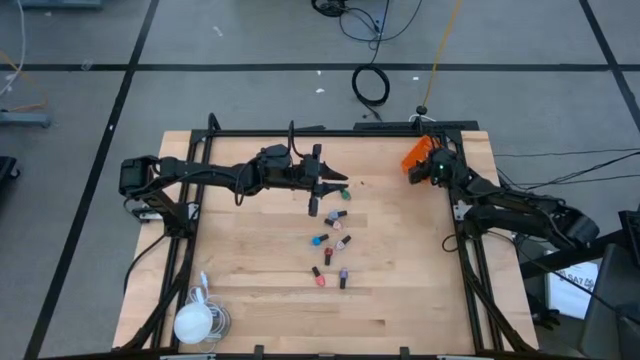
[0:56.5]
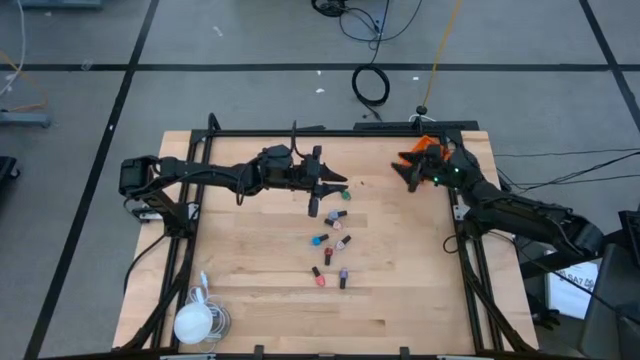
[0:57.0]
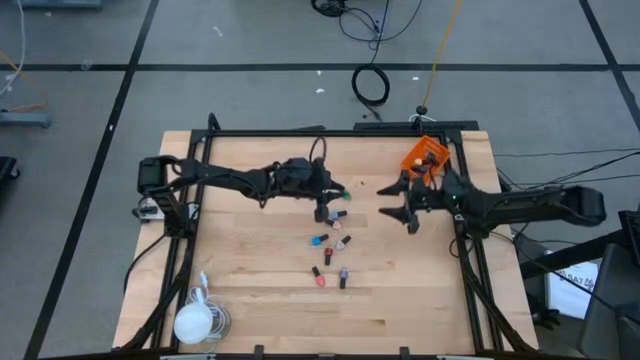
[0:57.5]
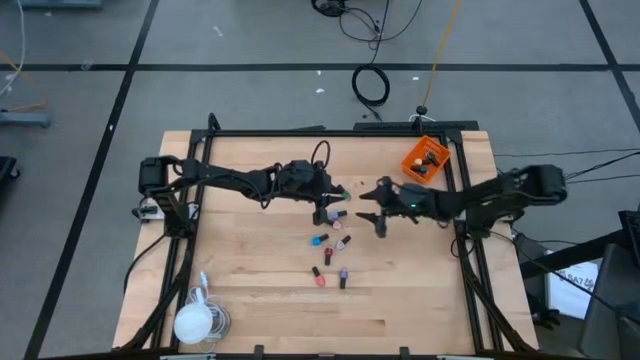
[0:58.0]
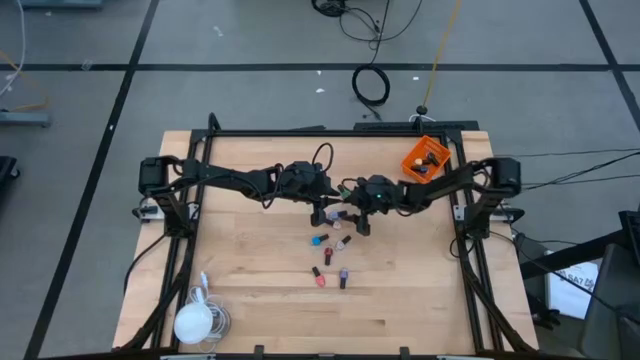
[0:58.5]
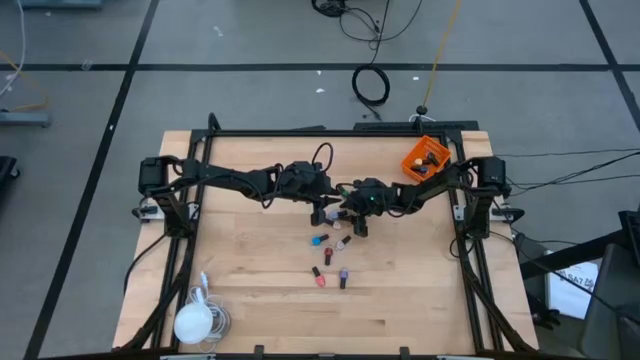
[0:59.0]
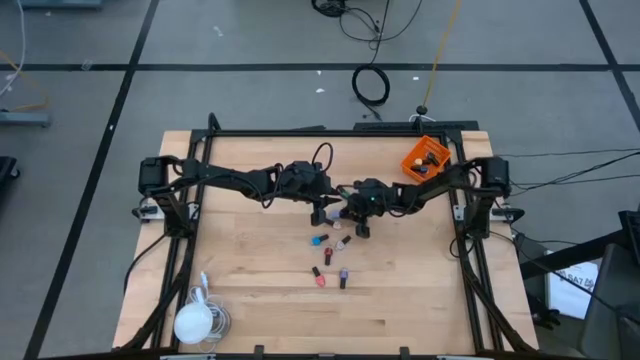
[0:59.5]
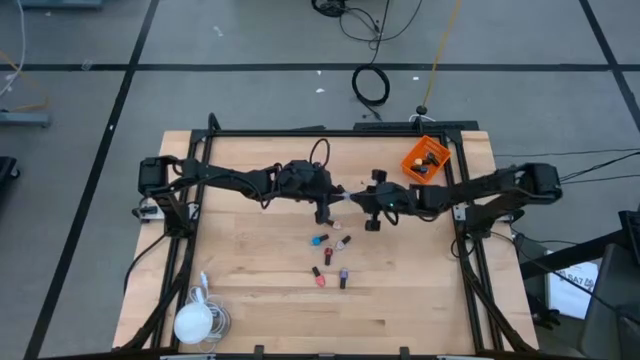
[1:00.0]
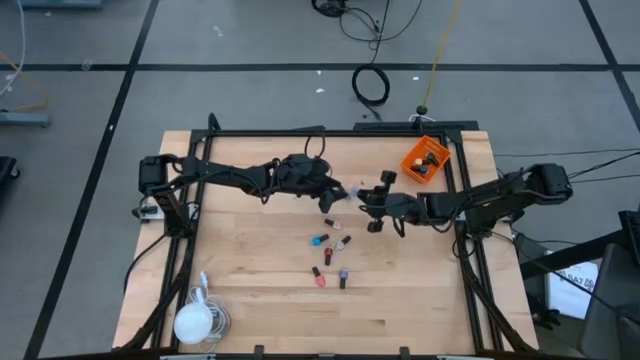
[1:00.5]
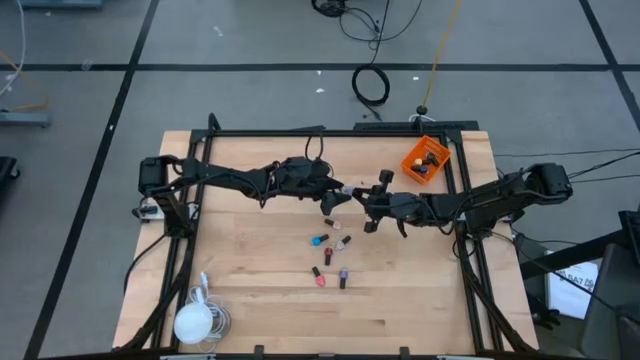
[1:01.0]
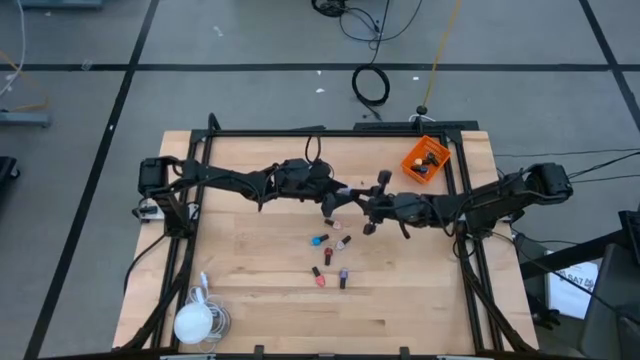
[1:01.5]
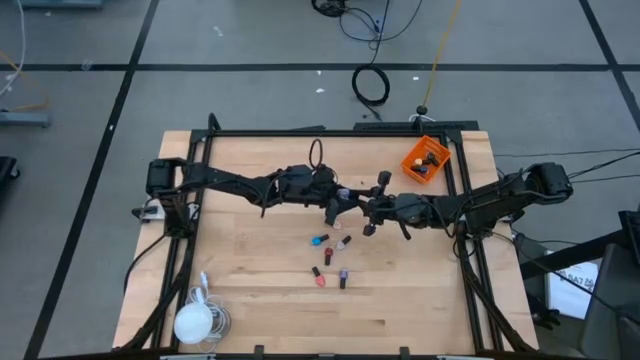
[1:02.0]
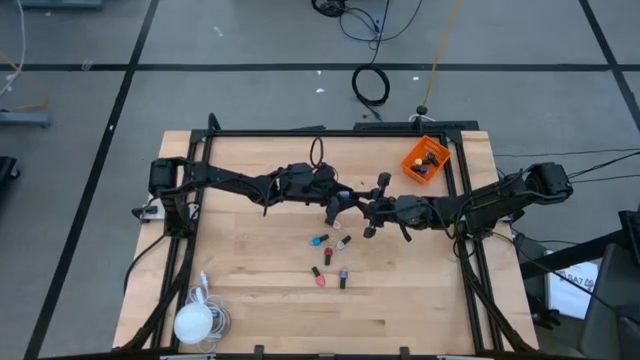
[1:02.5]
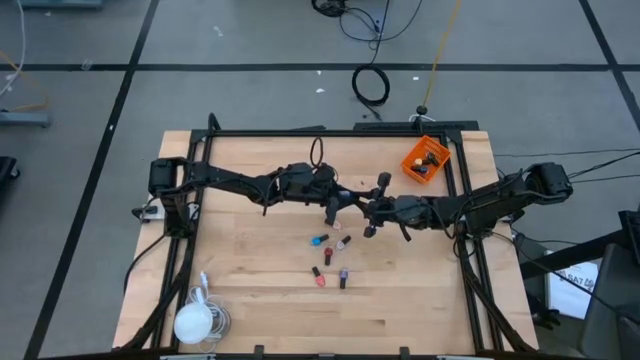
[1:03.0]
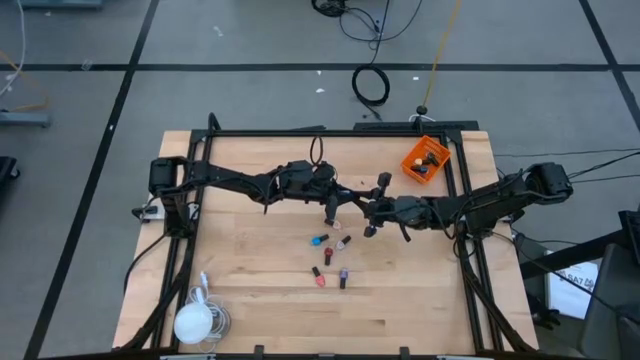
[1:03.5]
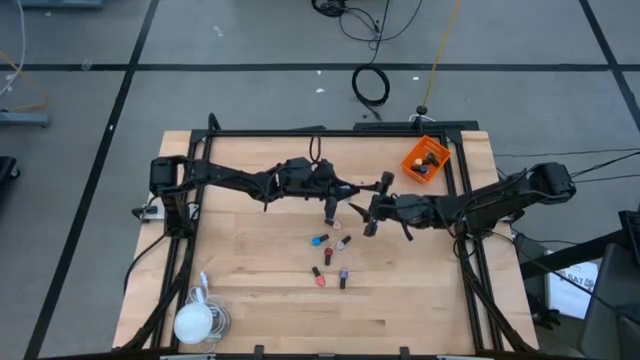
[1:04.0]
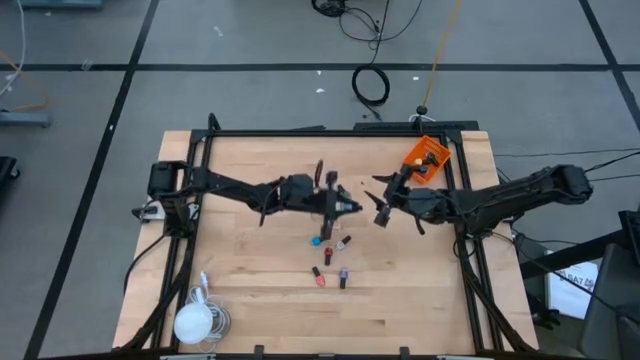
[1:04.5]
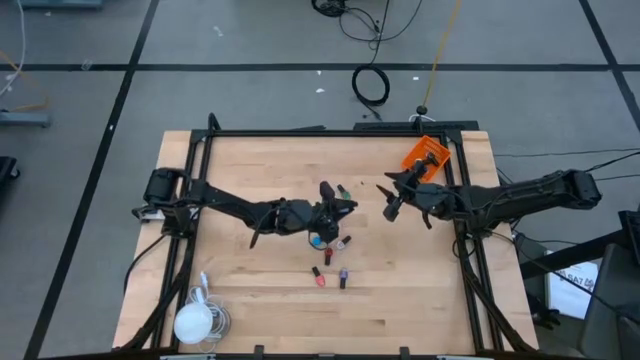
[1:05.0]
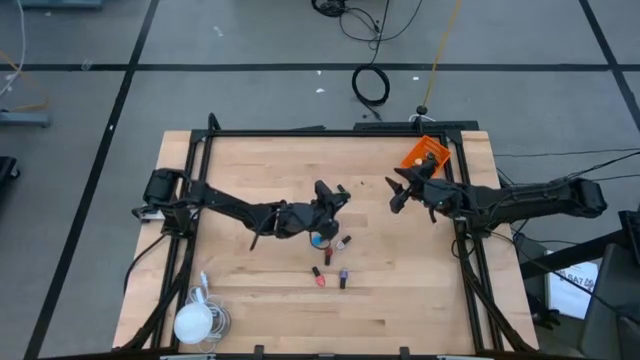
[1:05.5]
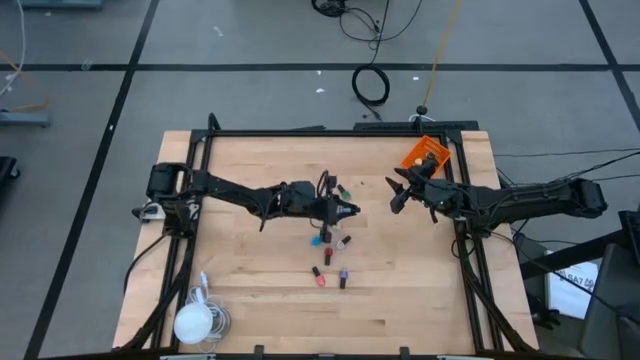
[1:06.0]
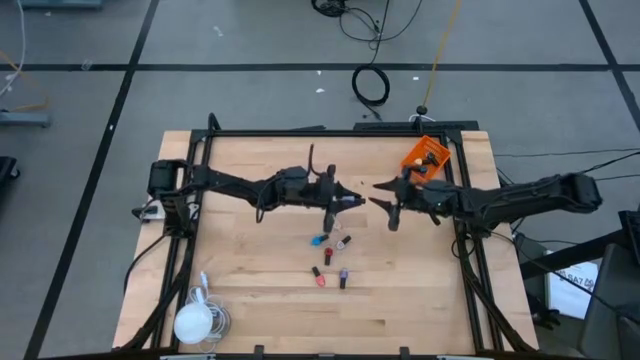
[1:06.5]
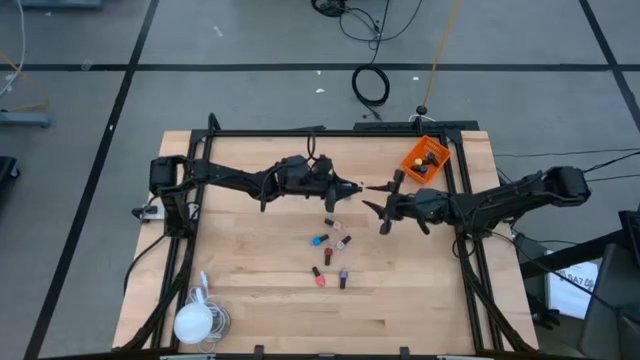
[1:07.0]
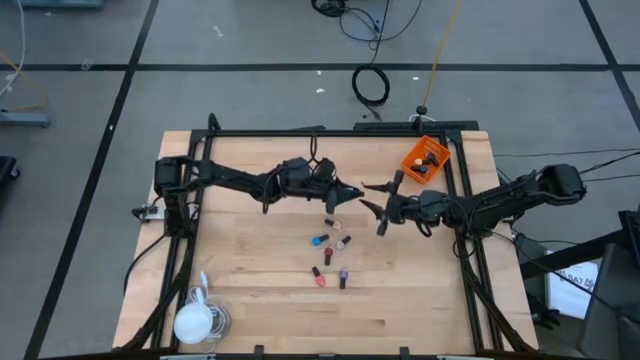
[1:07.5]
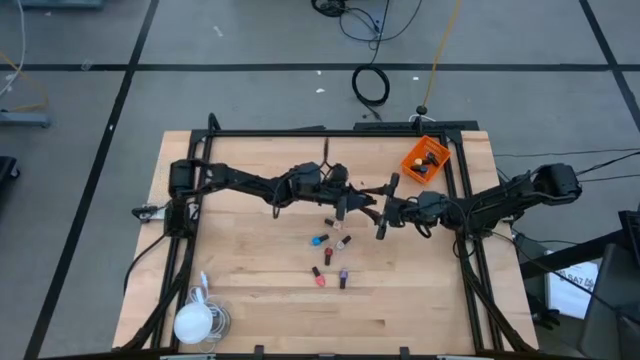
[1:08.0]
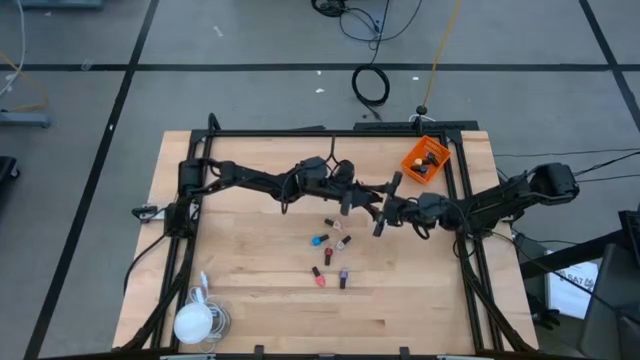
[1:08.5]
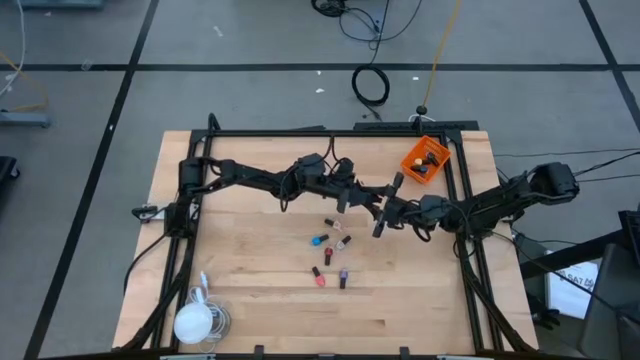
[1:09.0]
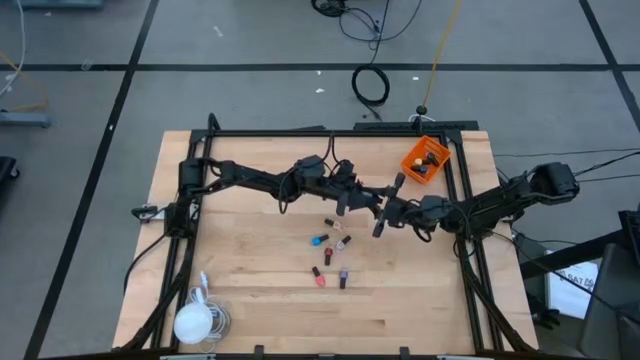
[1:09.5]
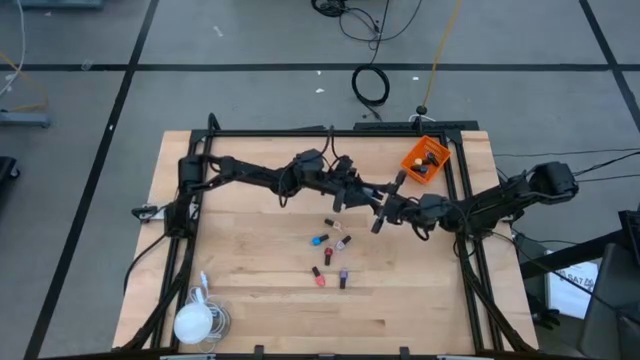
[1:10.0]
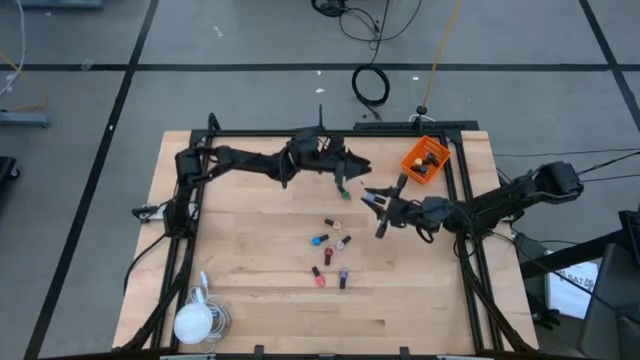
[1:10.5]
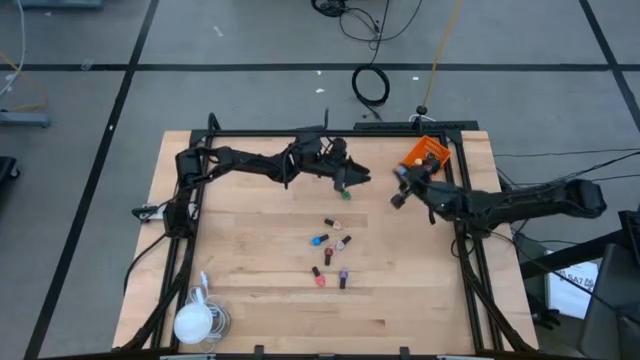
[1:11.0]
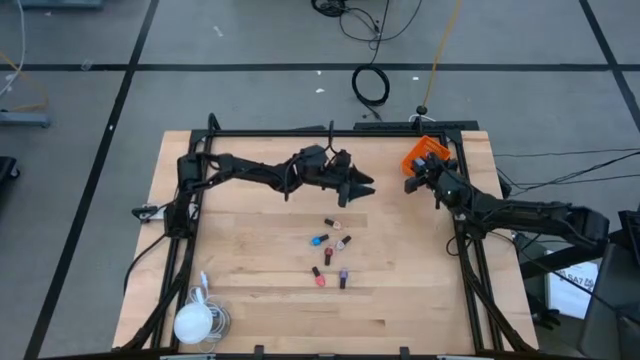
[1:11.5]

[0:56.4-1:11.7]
Task: Pick & Place Nail Polish
Put the light blue nail polish bottle into the orange basket

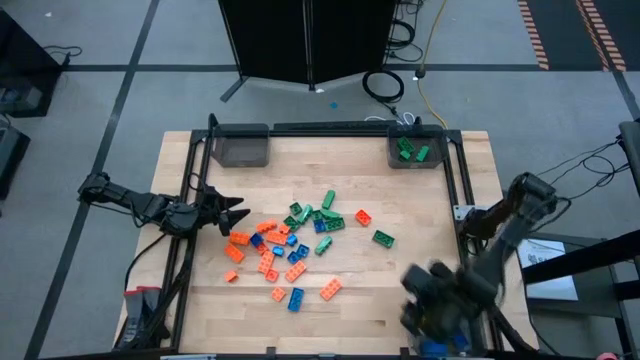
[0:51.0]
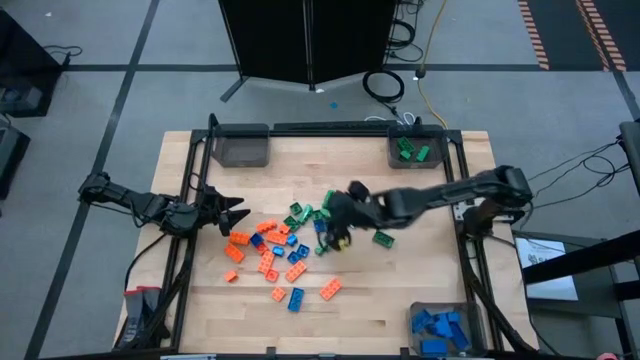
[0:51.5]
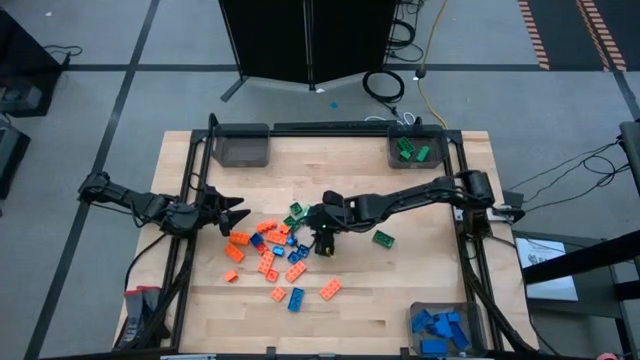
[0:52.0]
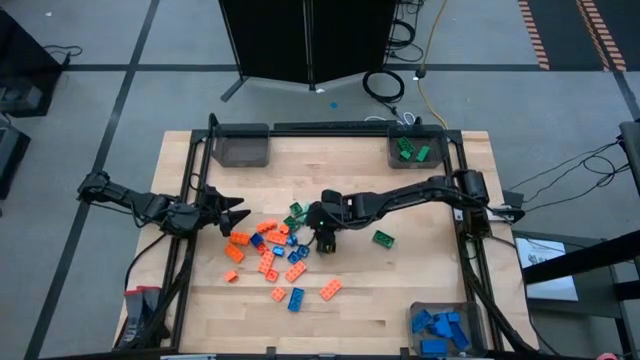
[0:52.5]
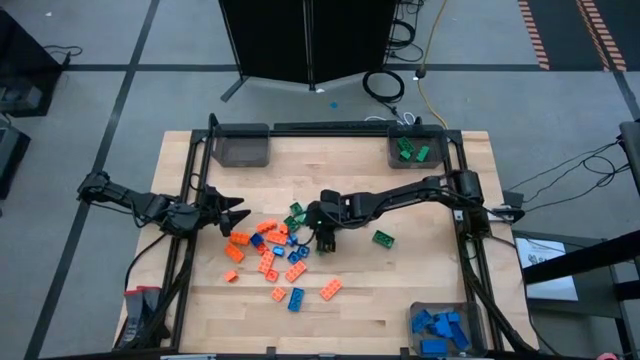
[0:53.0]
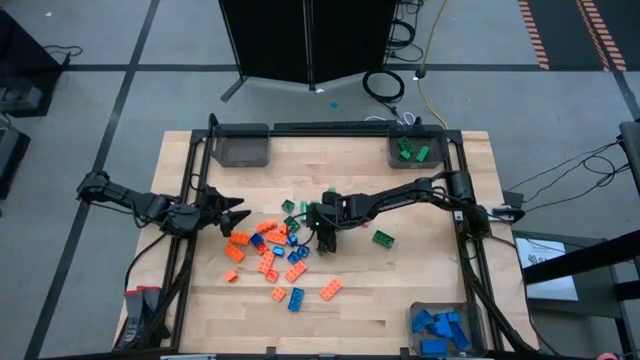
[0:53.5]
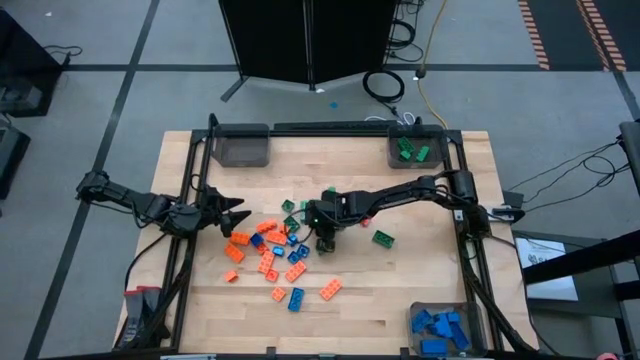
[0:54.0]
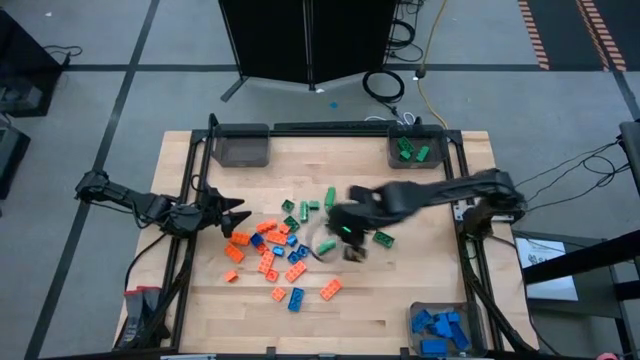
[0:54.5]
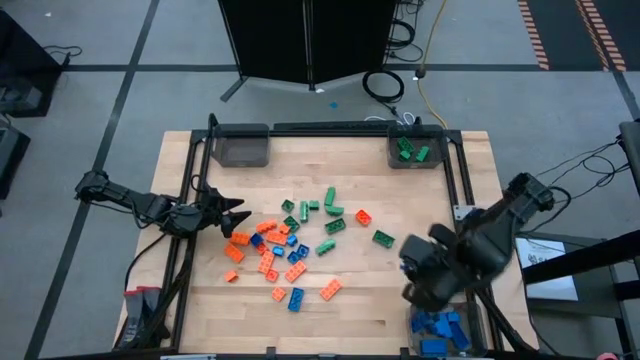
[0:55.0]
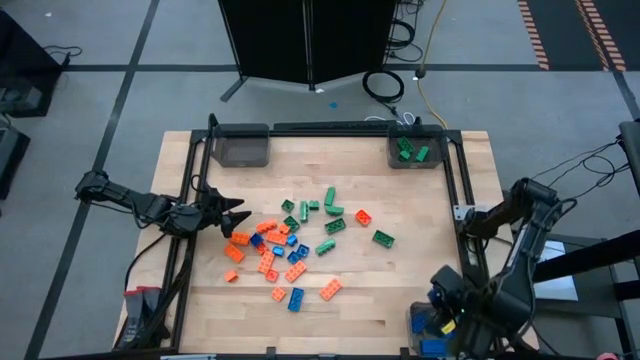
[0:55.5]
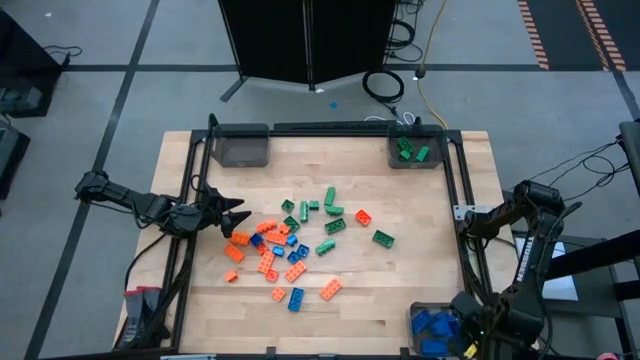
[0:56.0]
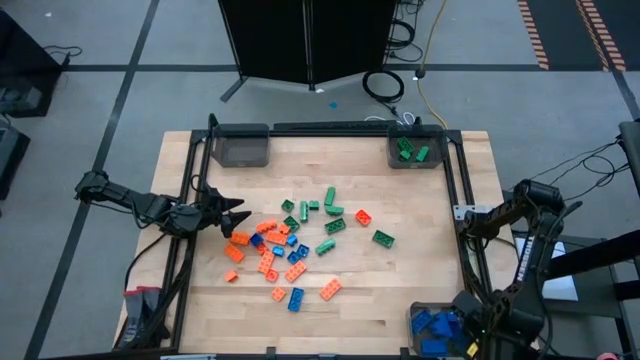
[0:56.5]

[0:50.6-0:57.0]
Task: Sort blocks
Put the blue game piece into the bottom black bin
